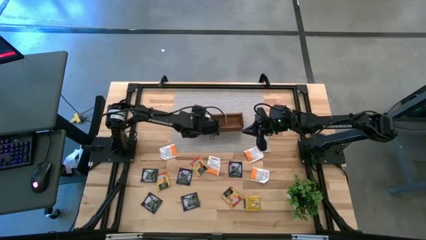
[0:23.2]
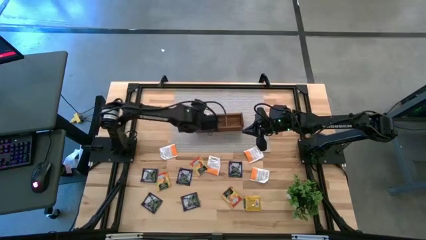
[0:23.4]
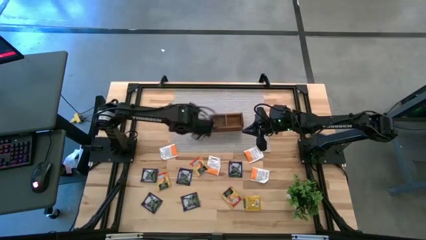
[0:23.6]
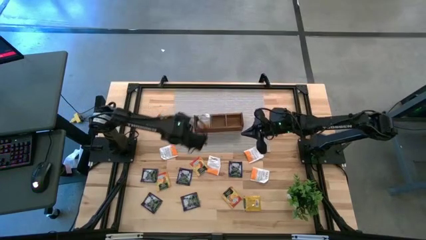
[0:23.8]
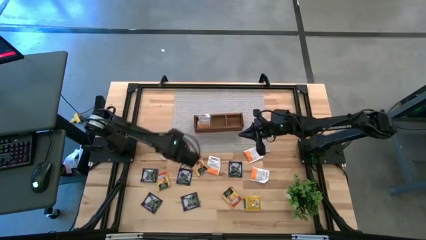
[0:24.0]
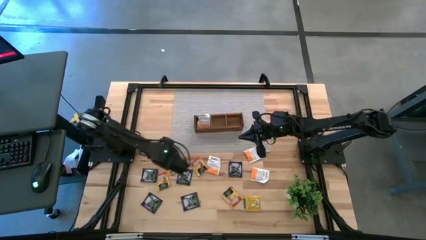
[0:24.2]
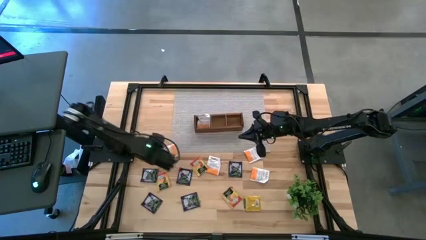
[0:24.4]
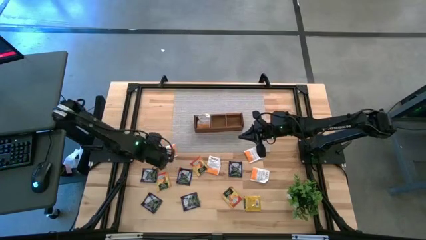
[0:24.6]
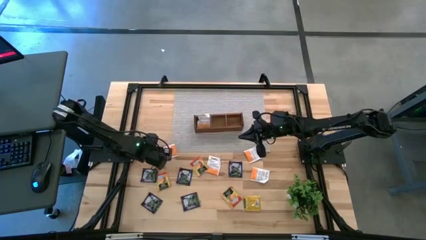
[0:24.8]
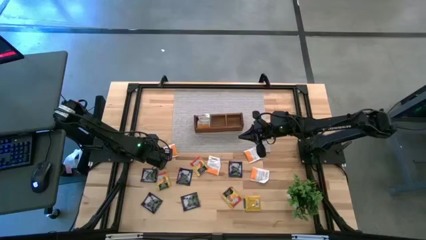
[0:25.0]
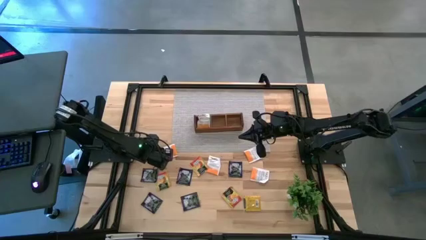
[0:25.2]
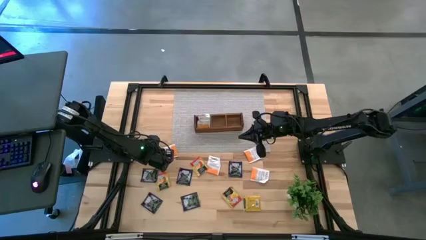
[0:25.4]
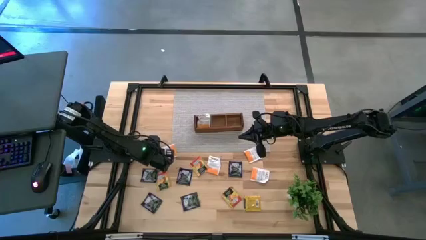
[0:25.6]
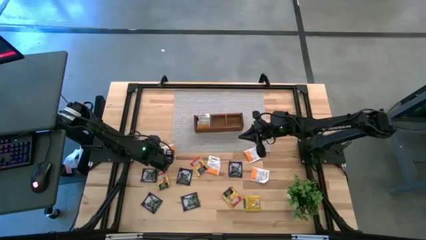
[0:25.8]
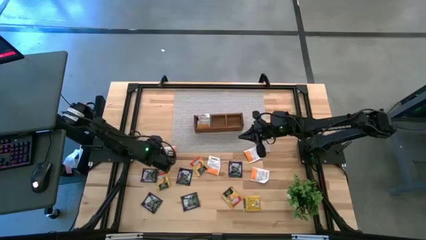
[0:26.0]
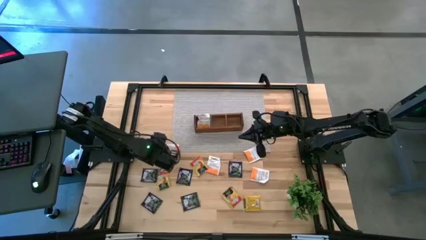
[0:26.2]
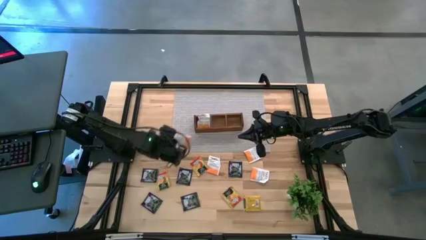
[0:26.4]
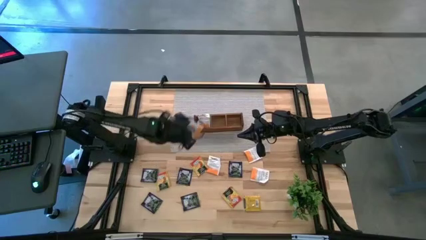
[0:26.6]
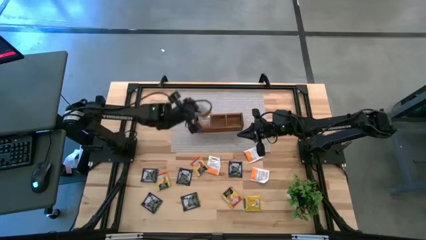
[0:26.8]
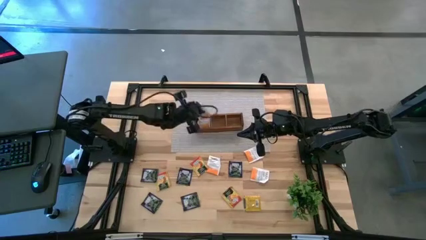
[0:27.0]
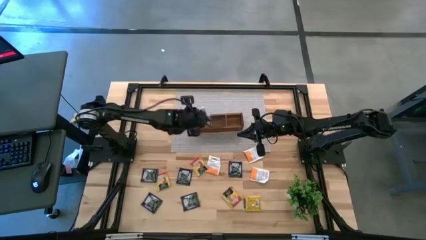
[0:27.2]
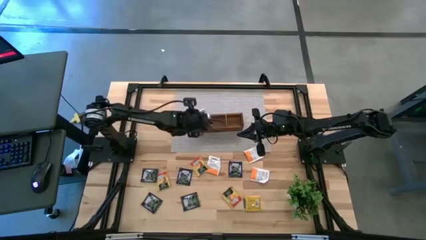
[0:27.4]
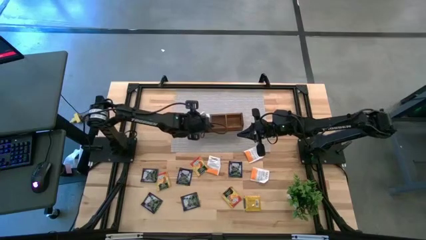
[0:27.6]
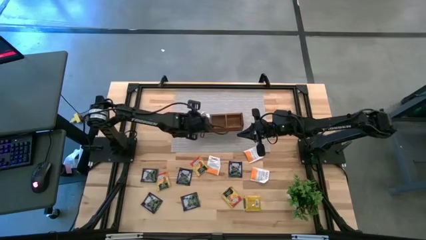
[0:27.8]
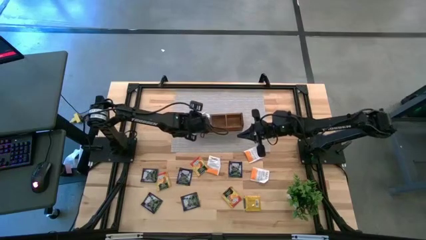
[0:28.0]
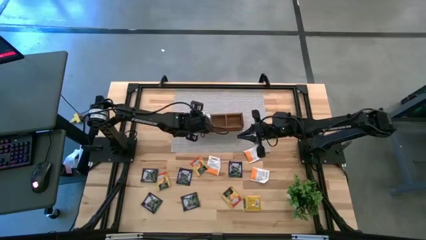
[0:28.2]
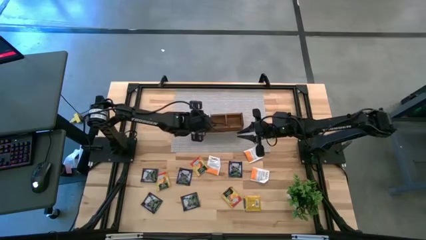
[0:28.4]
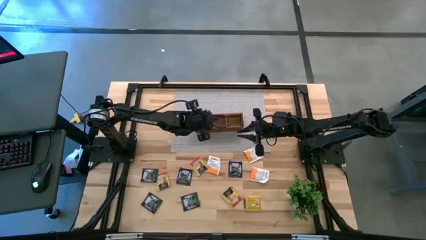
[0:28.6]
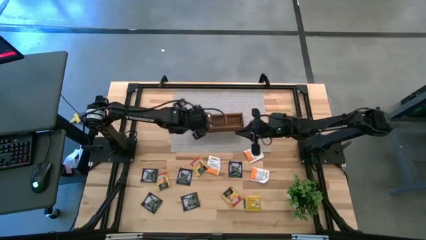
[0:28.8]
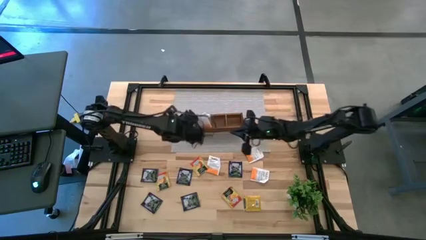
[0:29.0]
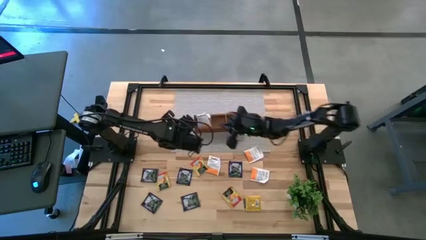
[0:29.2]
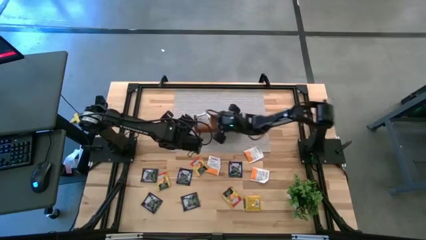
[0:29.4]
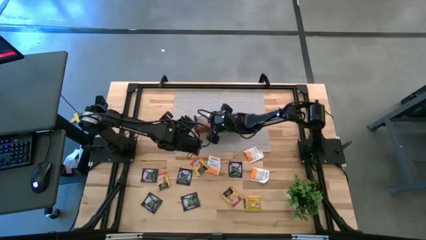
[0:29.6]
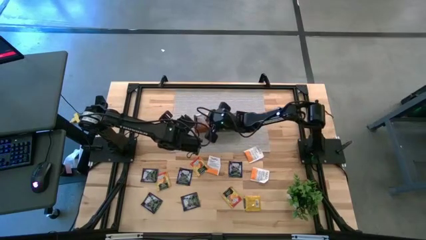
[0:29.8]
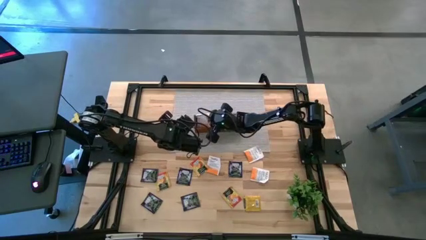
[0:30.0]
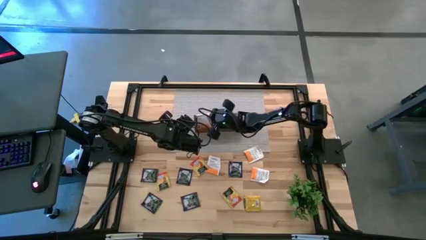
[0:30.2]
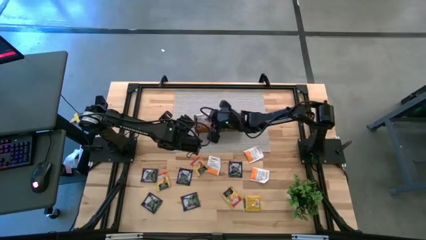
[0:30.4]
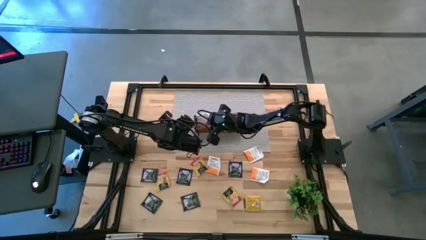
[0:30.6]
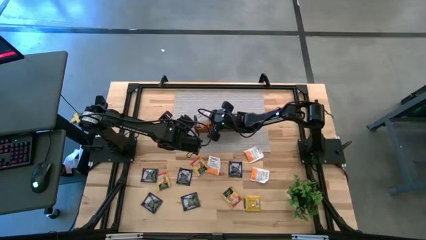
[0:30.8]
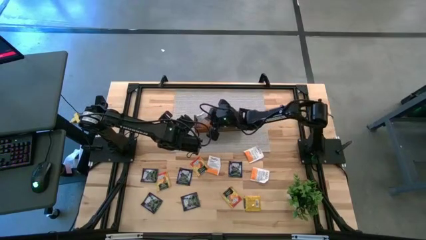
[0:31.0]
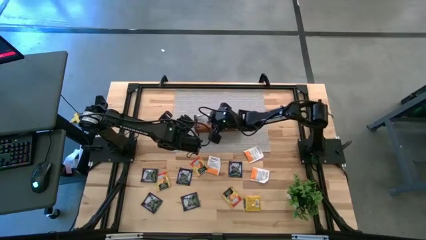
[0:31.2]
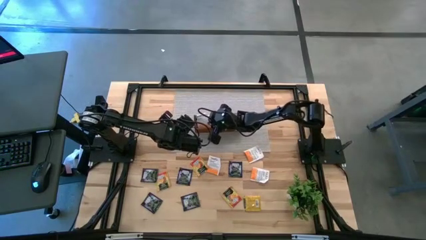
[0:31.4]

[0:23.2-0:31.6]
Task: Pick & Place Tea
Put the orange tea bag into the left section of the wooden organizer

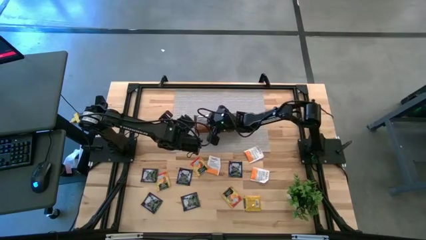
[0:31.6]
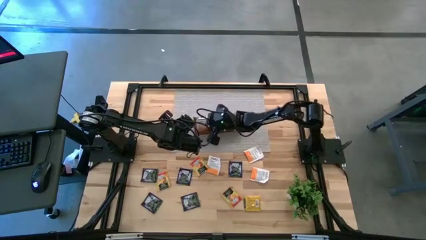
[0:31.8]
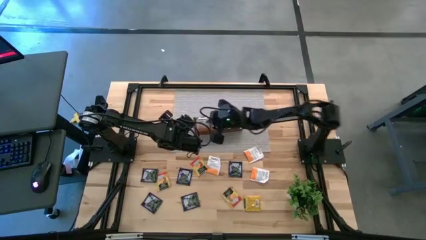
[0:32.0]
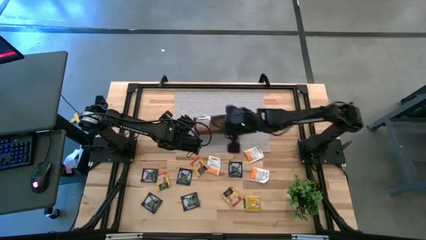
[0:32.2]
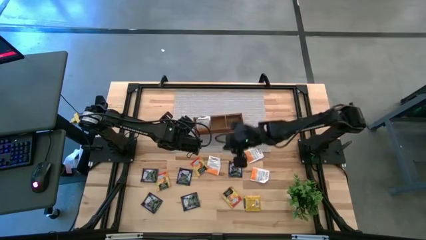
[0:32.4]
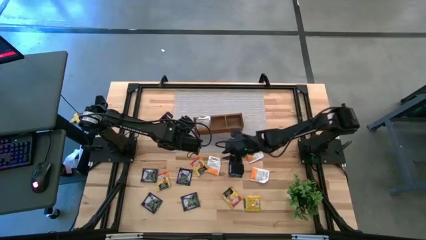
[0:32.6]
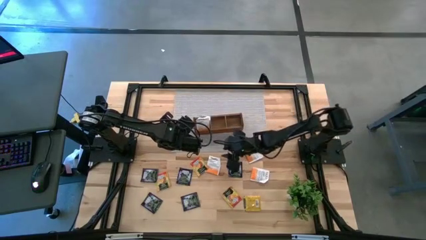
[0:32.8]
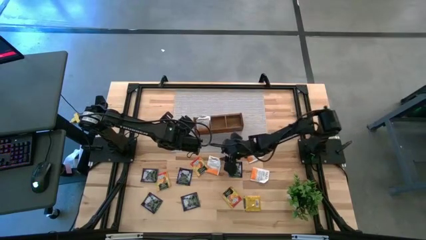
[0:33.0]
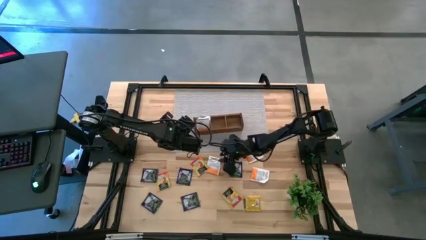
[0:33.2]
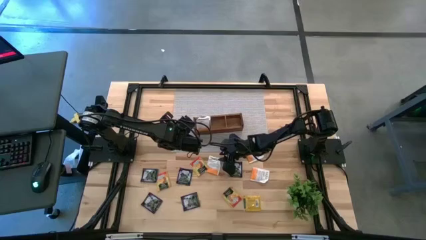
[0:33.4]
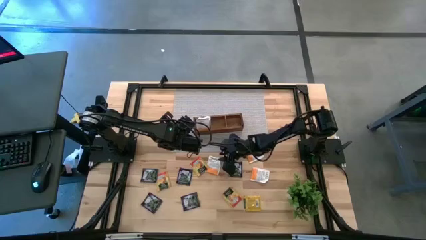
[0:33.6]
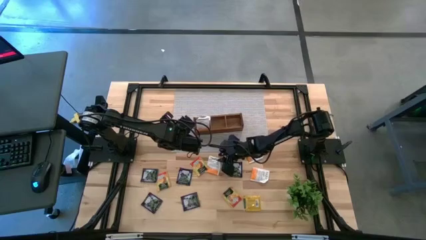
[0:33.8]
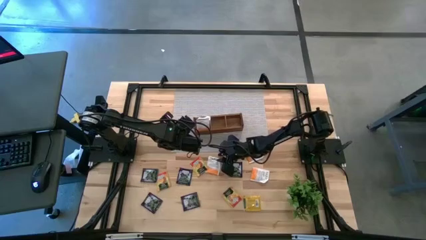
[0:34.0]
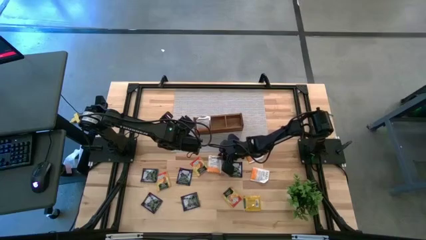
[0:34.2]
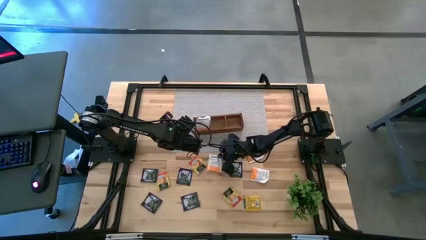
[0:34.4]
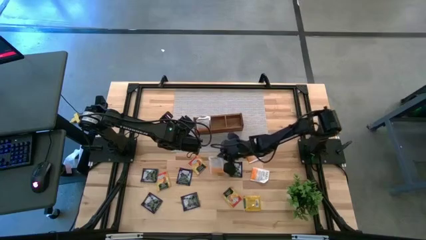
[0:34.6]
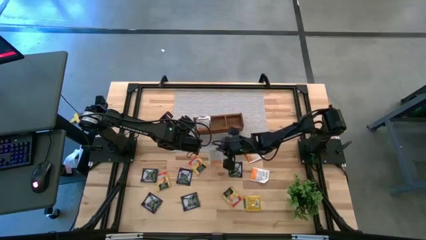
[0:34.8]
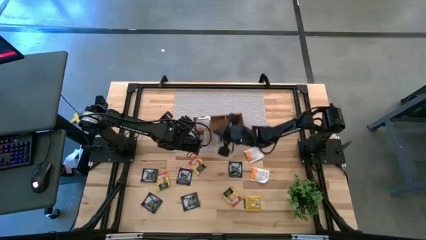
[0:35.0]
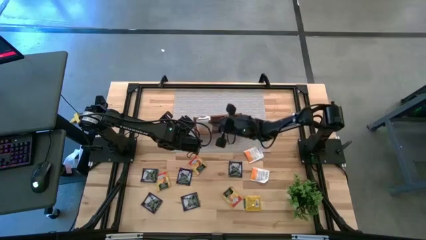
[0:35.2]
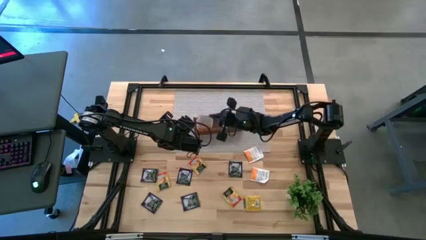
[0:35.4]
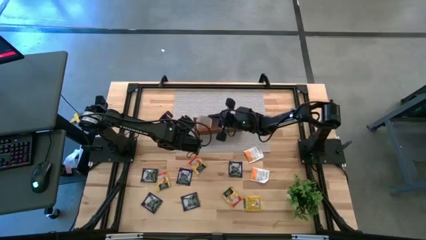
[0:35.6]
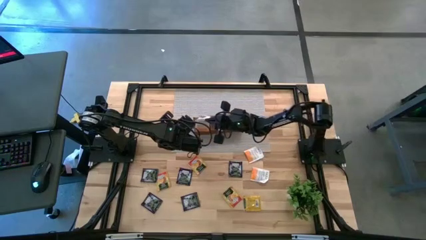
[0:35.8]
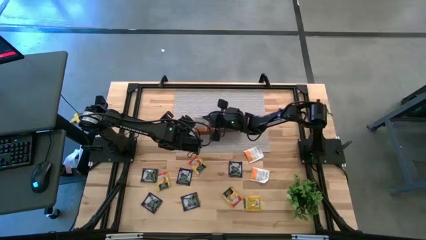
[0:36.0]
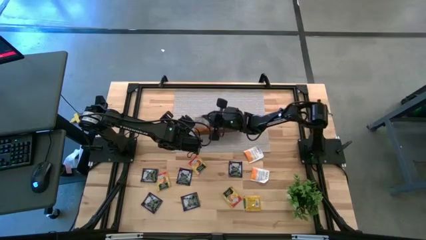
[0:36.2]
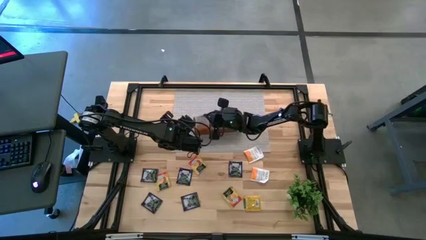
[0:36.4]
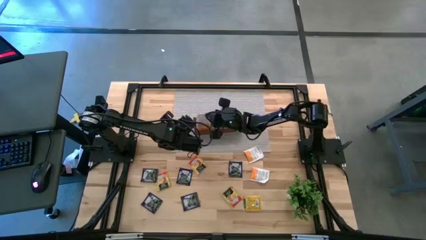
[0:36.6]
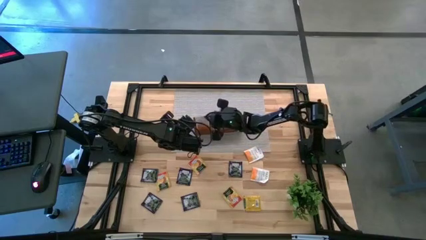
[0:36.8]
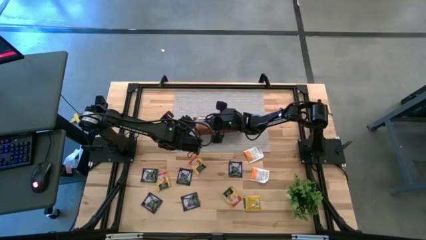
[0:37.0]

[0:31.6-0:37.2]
Put the orange tea bag into the left section of the wooden organizer

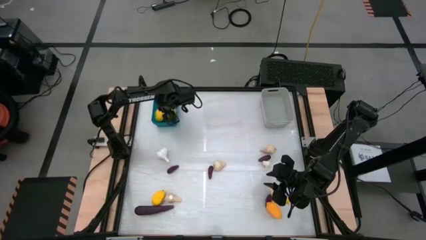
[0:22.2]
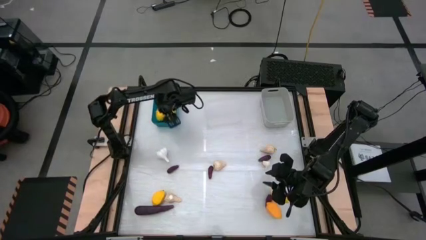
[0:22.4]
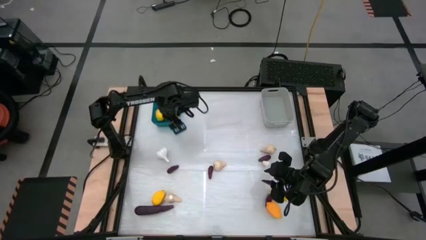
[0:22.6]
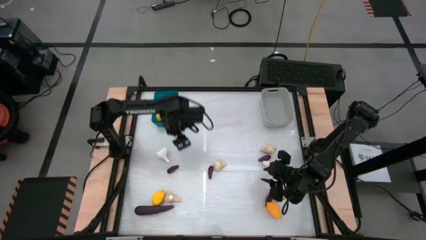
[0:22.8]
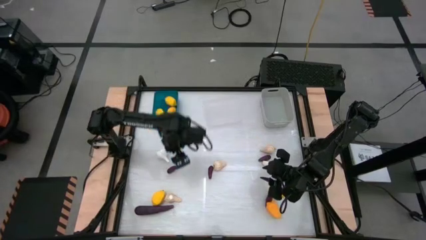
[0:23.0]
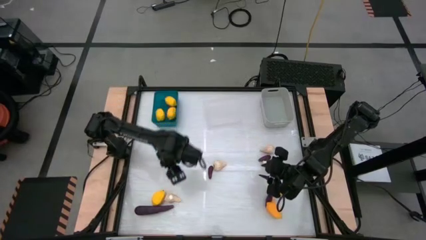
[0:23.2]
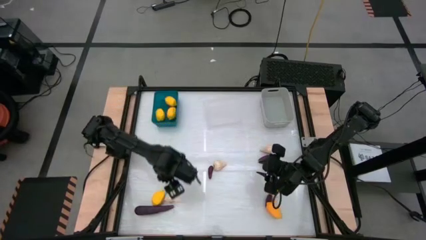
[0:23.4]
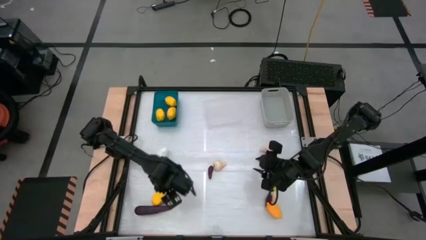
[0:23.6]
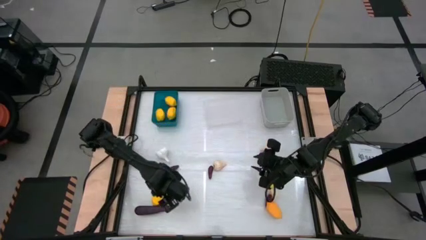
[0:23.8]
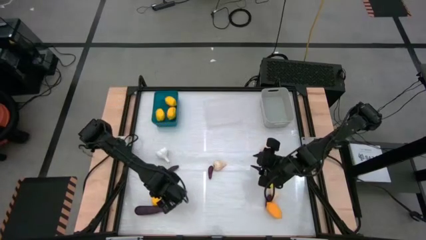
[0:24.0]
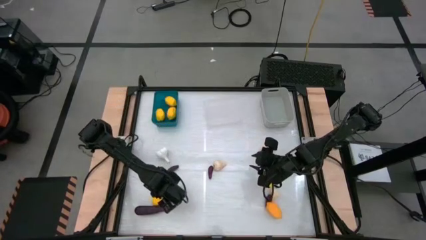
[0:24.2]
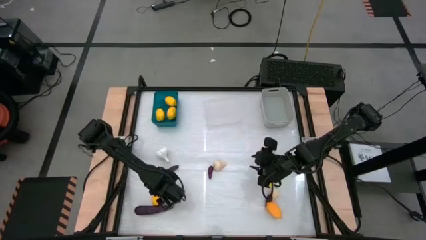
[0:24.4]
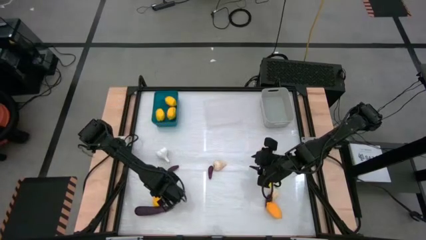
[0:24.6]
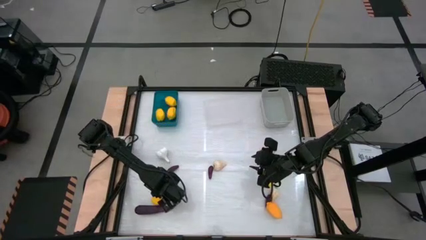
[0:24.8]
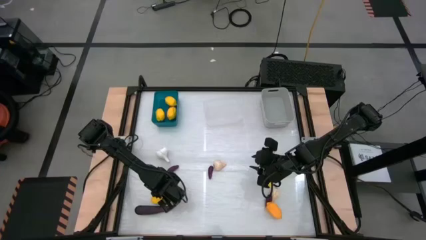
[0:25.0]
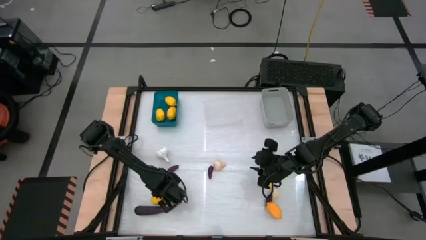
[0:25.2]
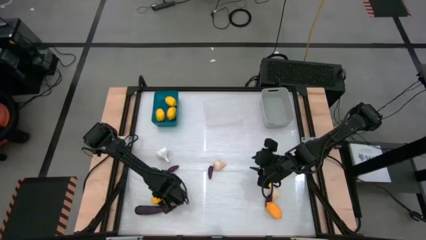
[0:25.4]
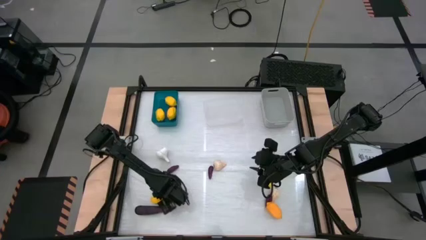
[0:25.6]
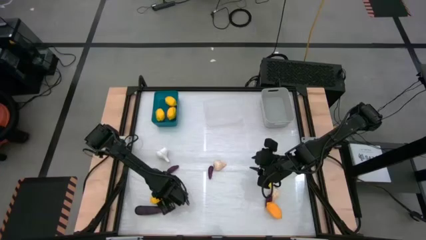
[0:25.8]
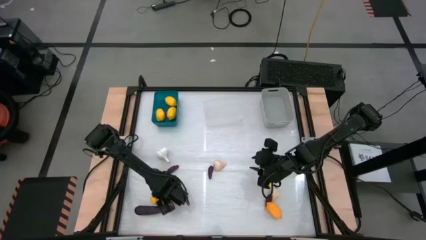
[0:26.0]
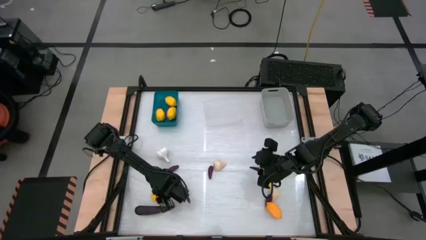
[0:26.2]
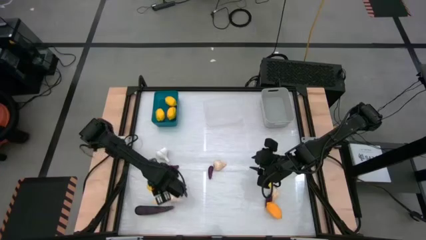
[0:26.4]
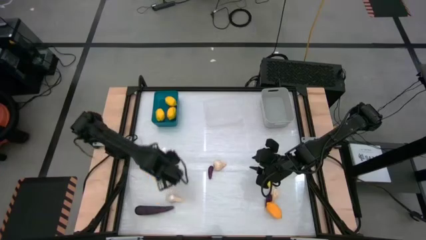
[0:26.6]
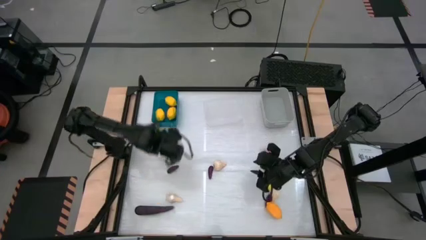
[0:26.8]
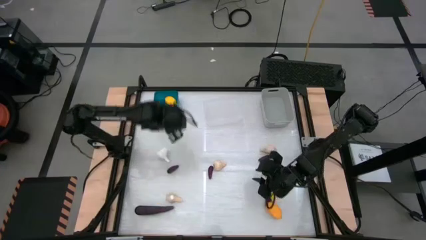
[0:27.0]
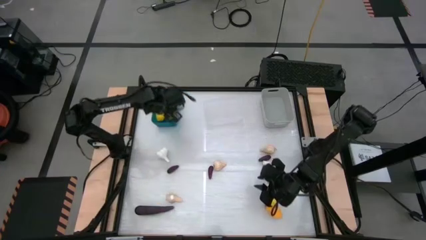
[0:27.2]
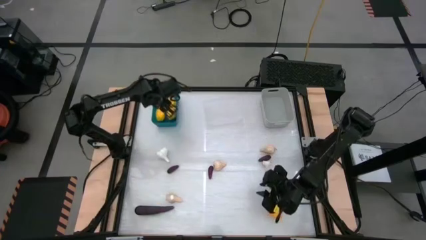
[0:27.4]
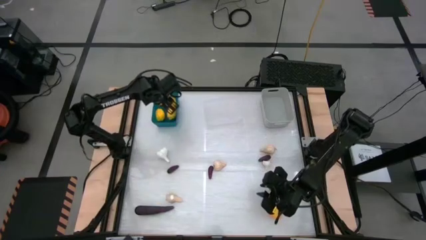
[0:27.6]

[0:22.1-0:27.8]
Task: Sort produce into baskets
Put the lemon into the blue bin
